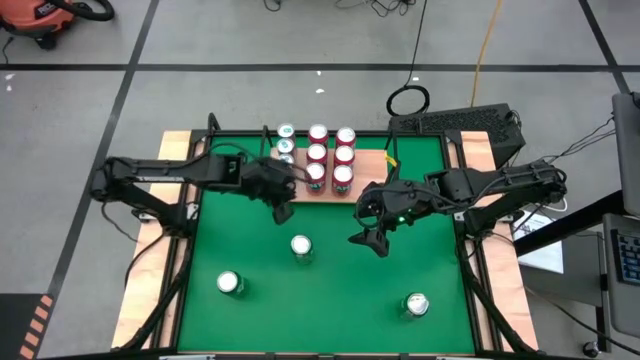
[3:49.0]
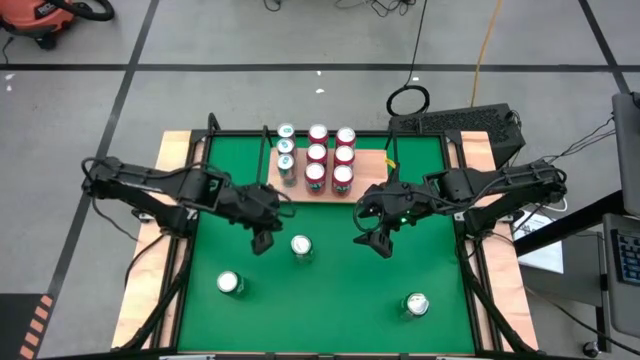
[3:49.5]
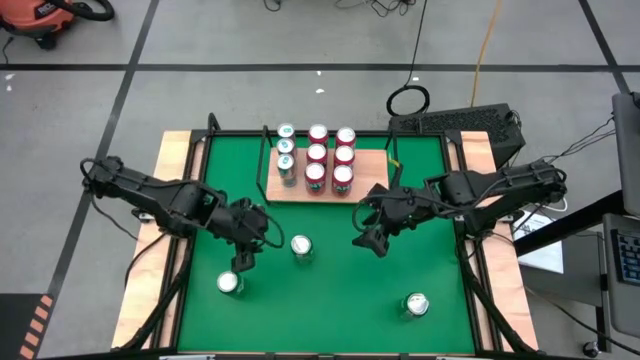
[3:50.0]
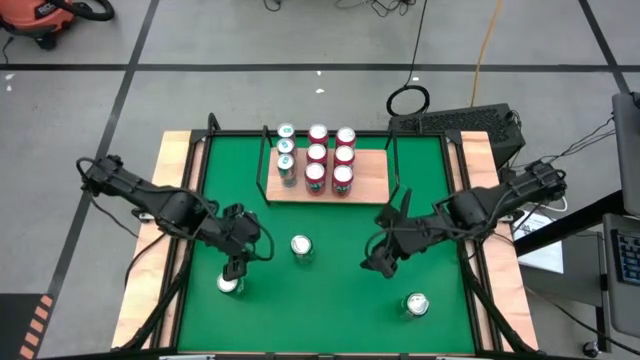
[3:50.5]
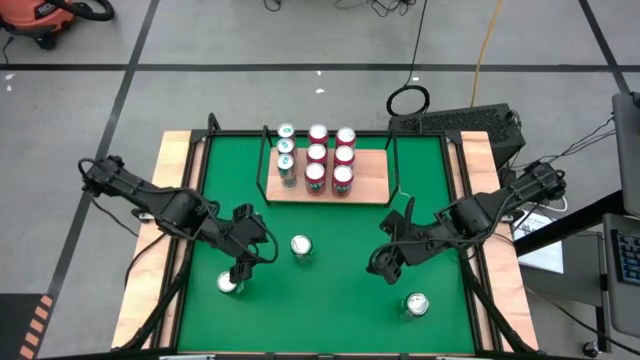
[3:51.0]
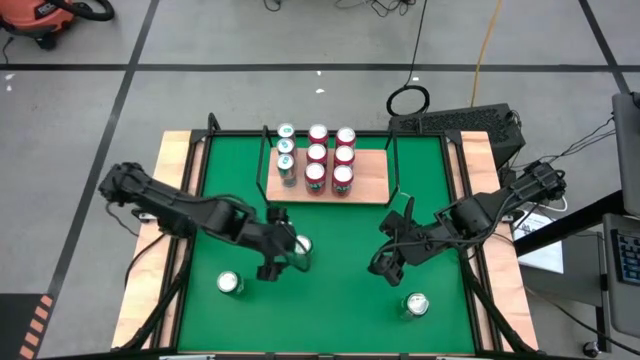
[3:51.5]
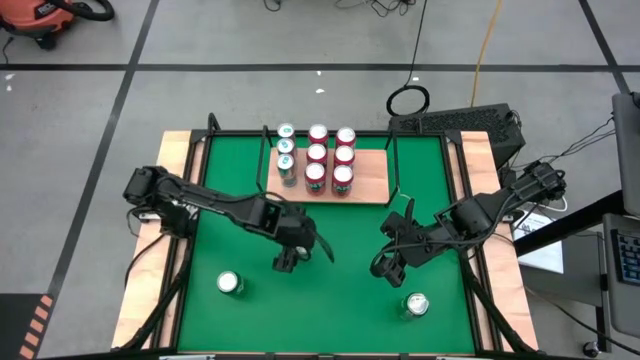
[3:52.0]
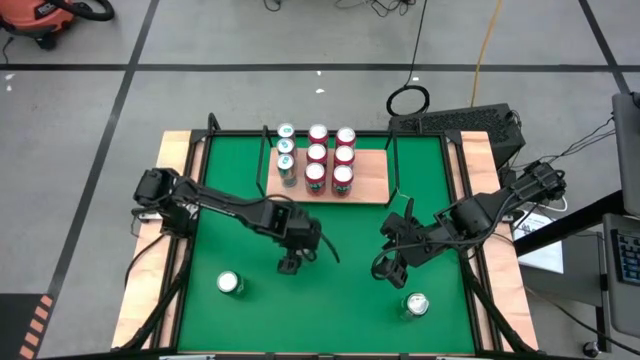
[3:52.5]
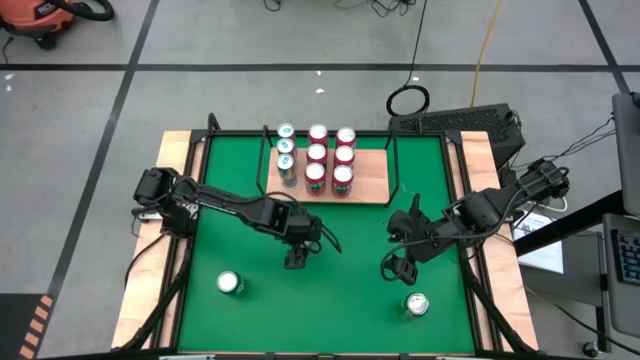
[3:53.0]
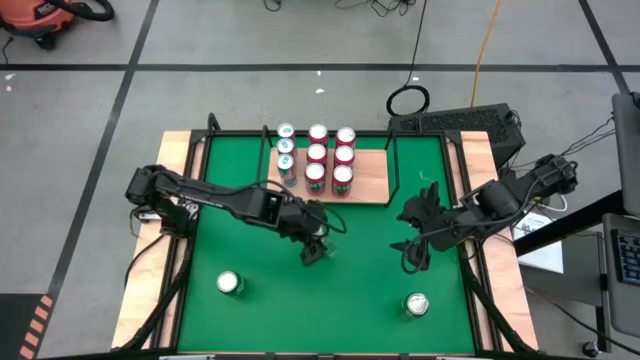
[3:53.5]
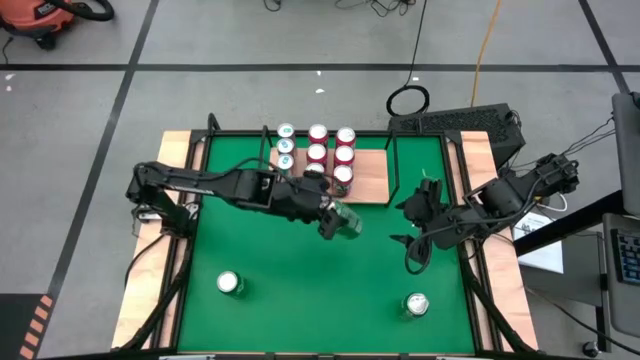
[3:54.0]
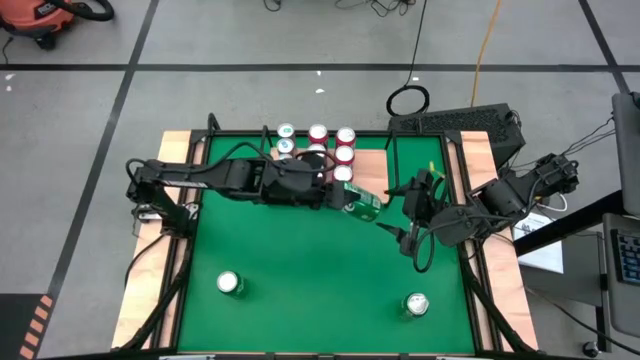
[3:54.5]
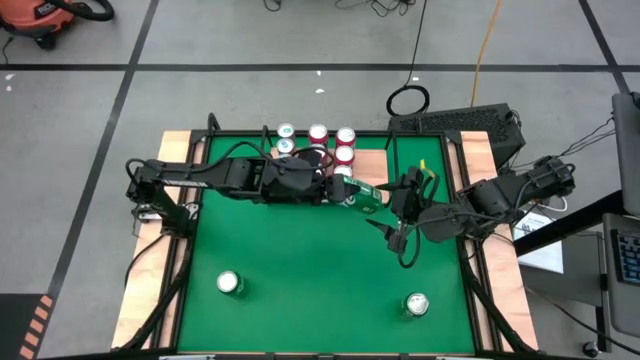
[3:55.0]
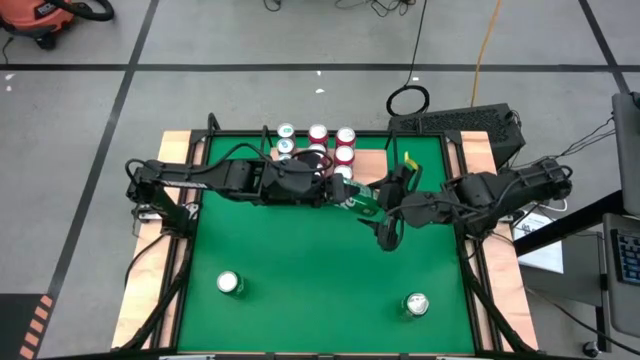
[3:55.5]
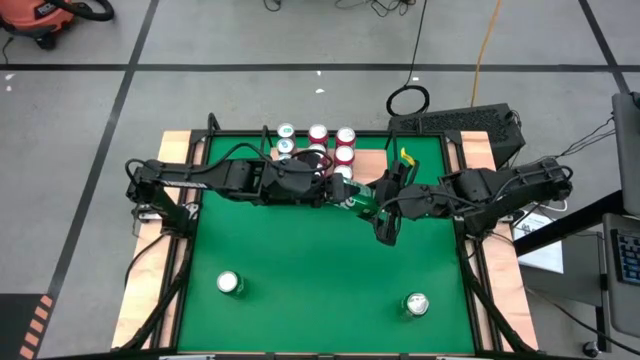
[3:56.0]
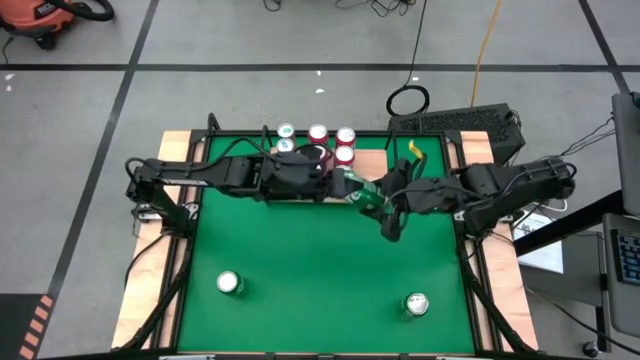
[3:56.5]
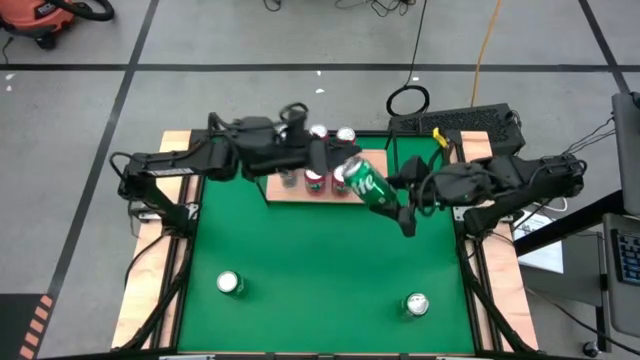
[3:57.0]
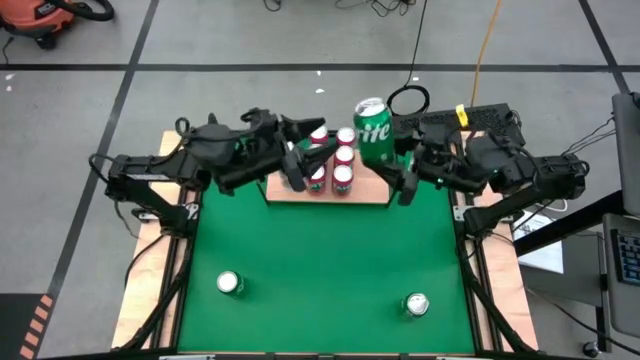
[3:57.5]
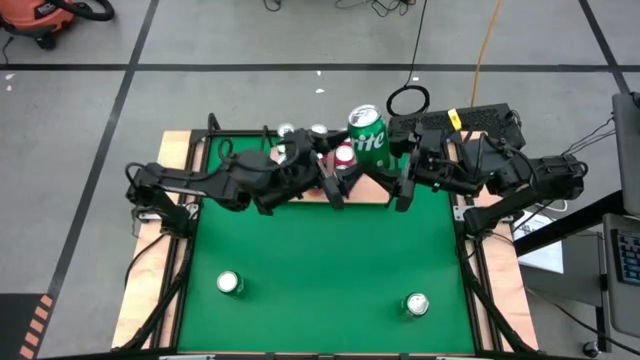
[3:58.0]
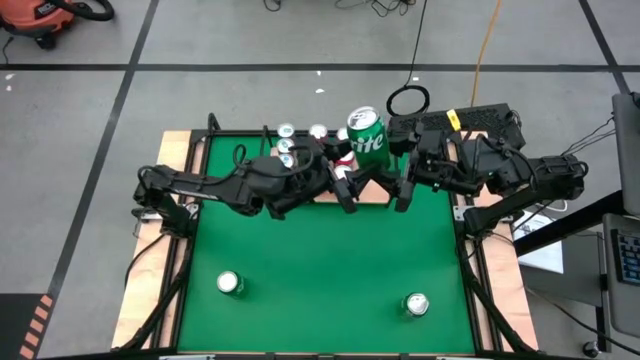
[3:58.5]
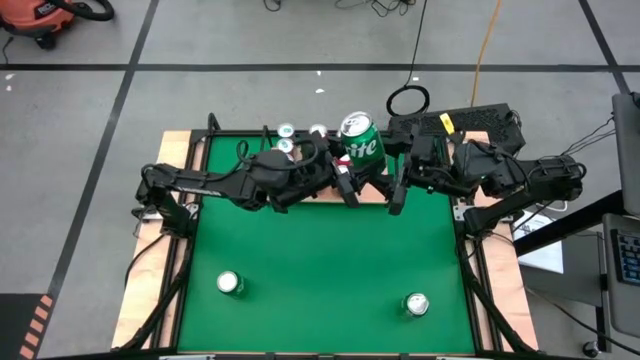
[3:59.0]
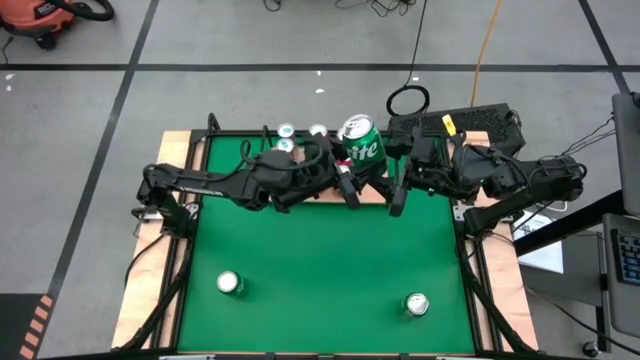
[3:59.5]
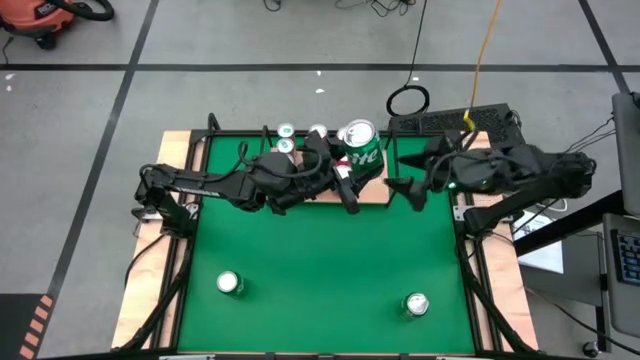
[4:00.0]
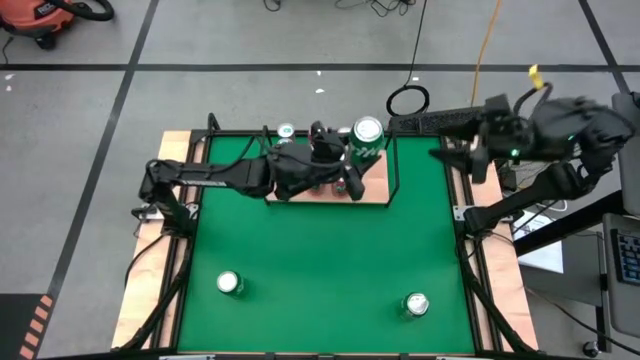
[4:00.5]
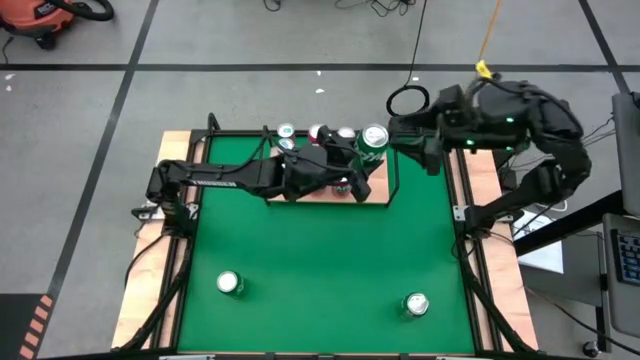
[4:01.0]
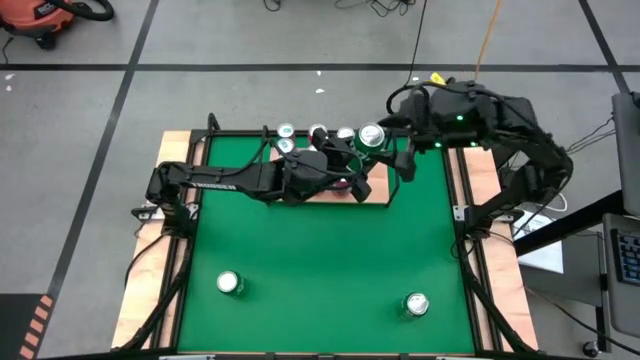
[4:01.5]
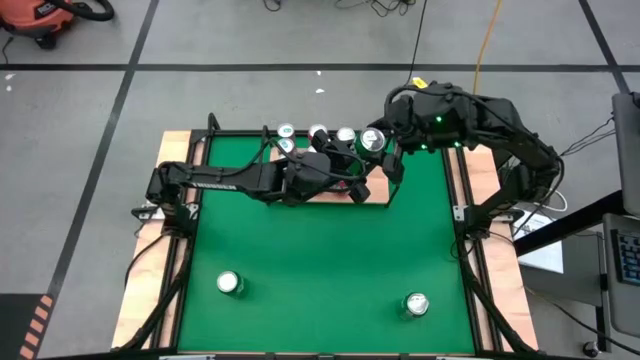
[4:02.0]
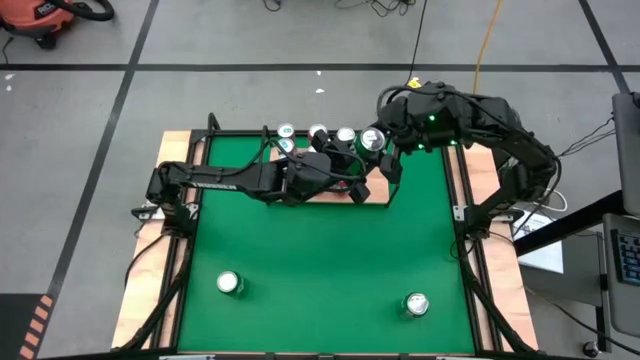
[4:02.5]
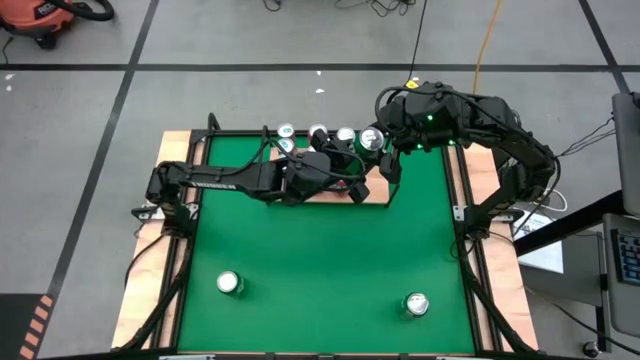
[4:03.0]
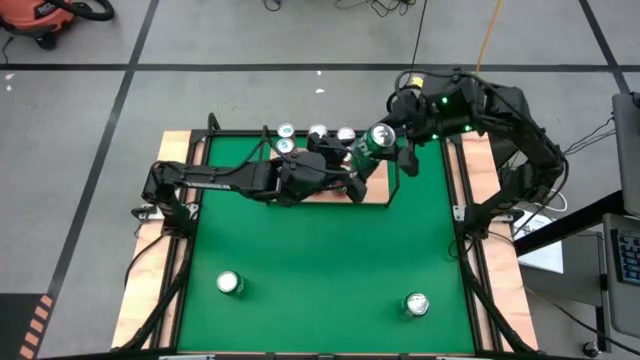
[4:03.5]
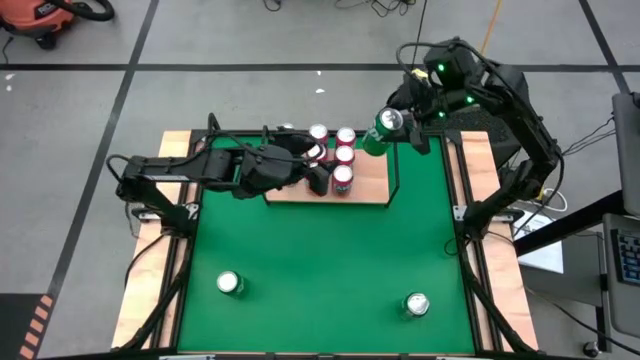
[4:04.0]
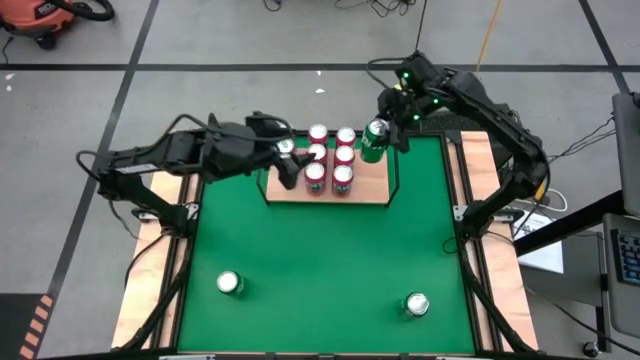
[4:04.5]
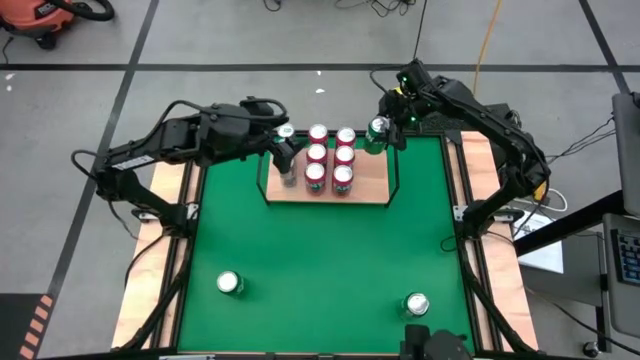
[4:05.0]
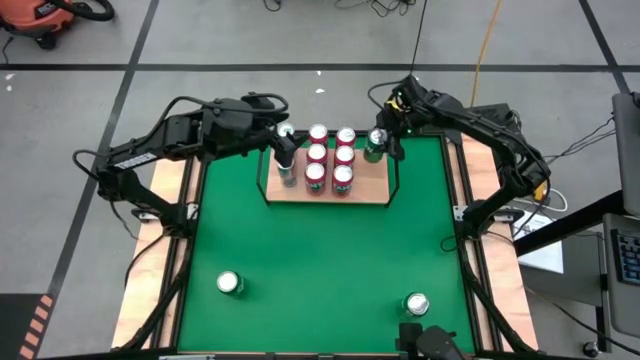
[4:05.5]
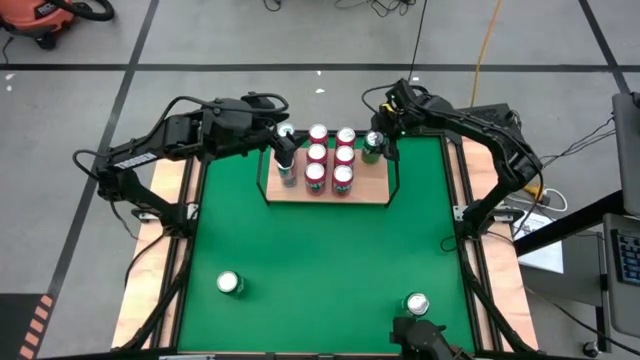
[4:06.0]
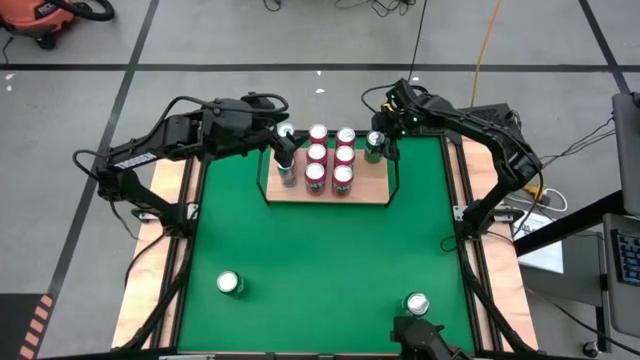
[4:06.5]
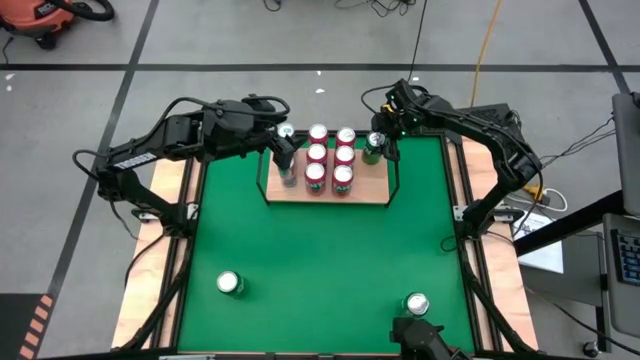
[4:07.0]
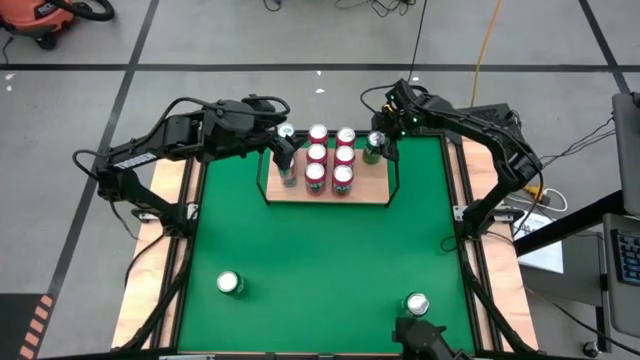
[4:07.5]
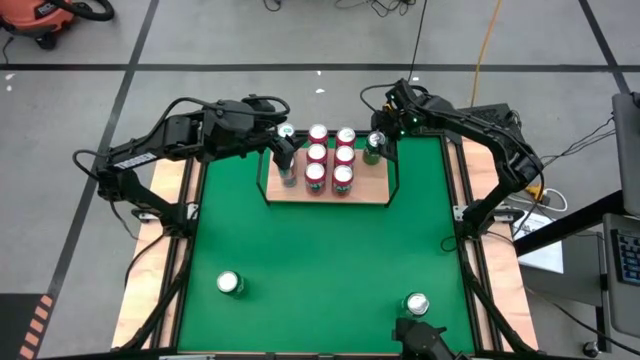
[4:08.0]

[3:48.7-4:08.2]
Task: Place canned beverage on shelf
Put the green soda can on the shelf

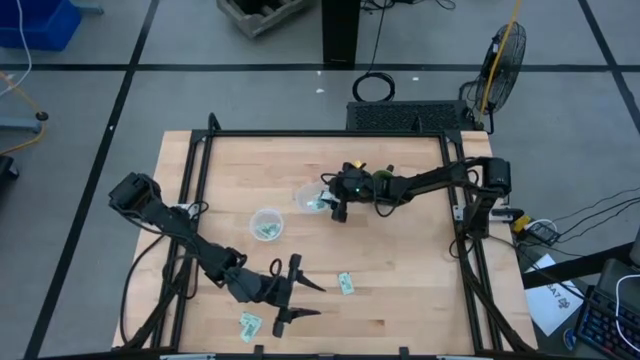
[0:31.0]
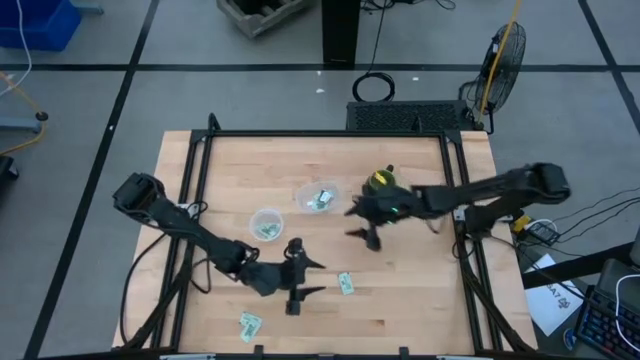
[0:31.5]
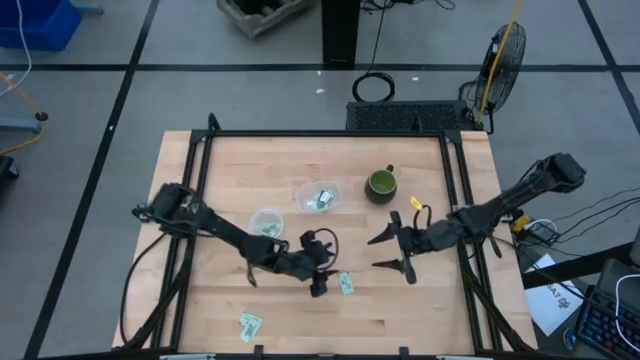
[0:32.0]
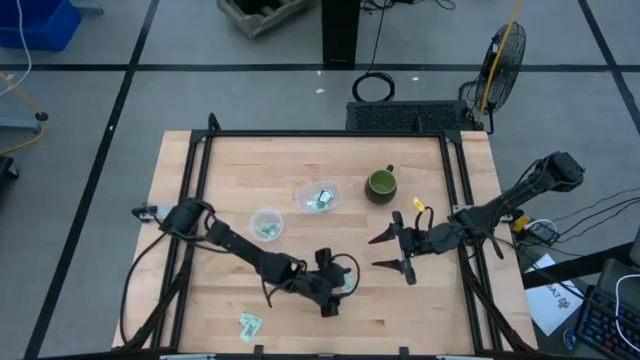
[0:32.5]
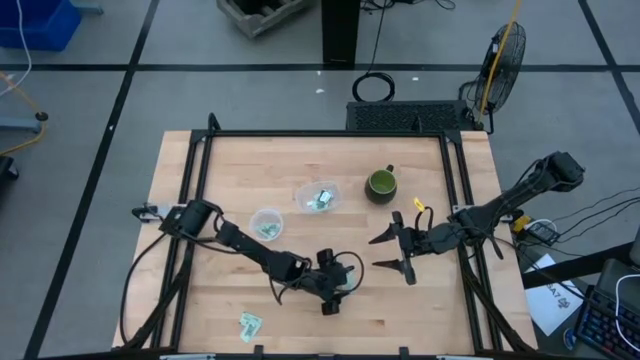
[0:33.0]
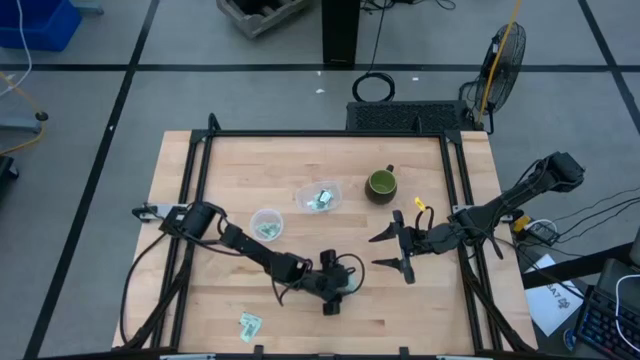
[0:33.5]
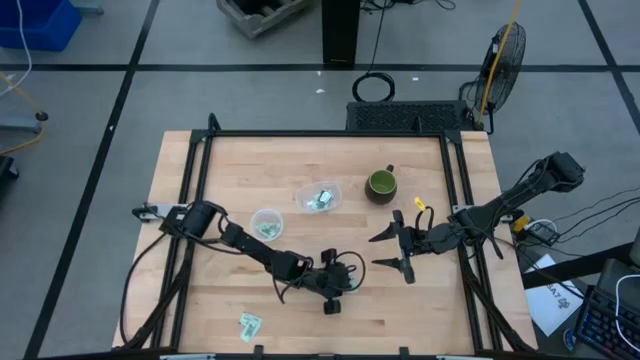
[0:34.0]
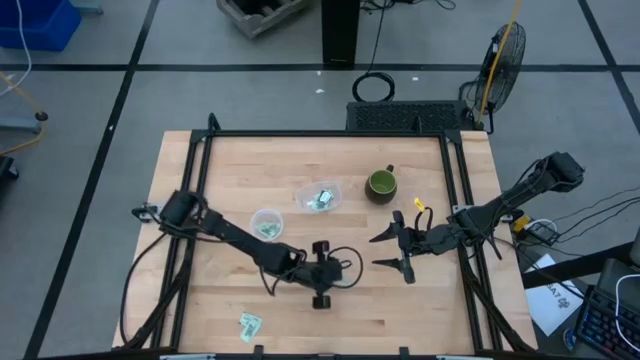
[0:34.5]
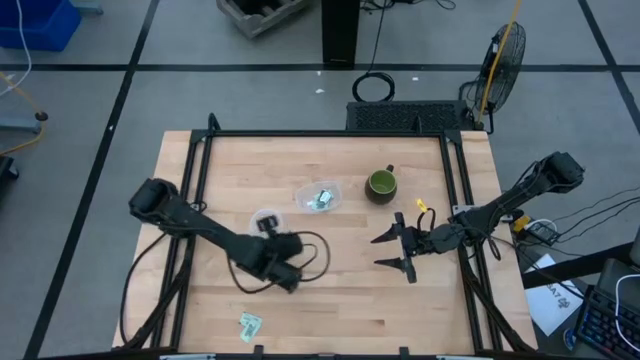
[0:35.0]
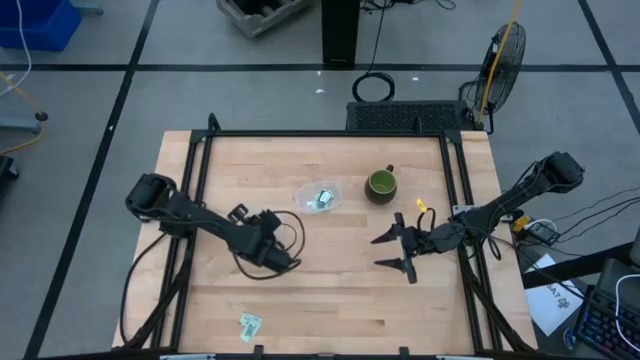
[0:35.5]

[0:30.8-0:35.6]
Task: Pick and place Stevia / Truvia into bins
Put the stevia packet into the round container
